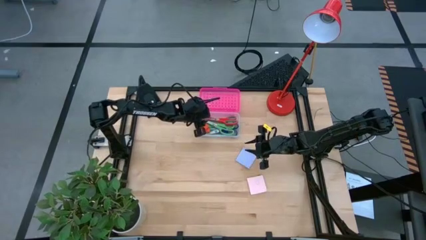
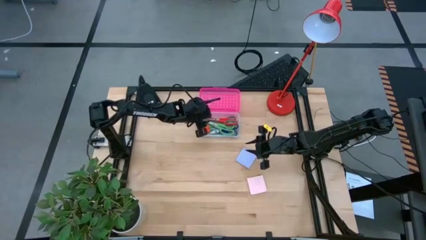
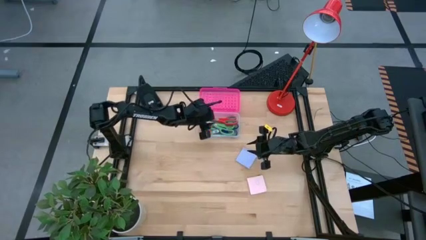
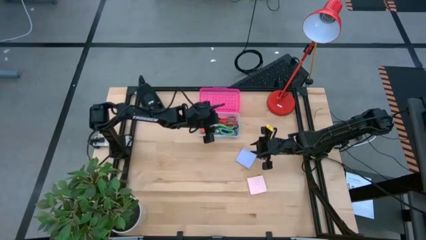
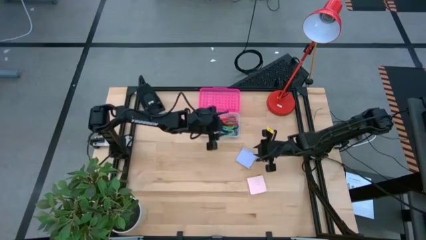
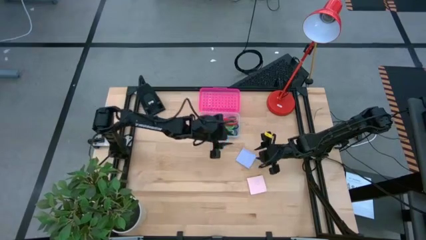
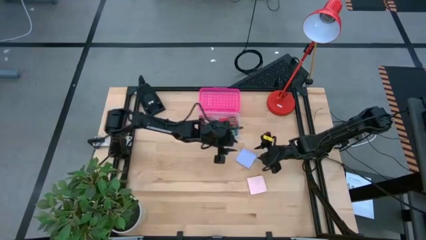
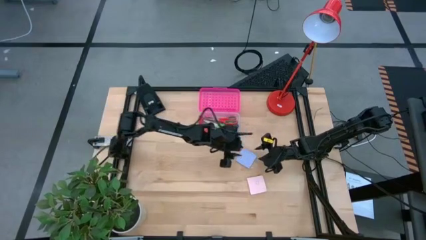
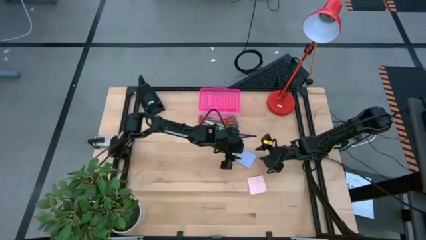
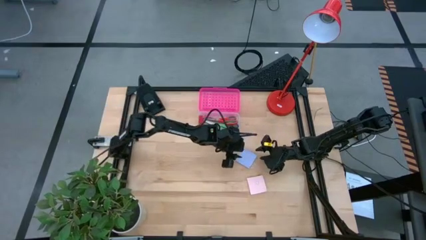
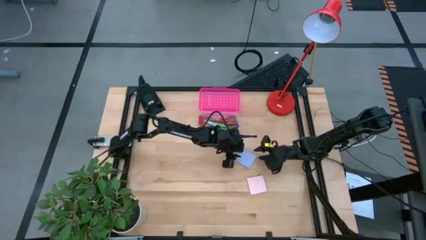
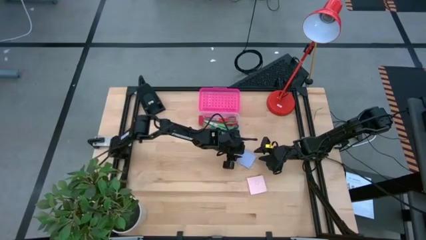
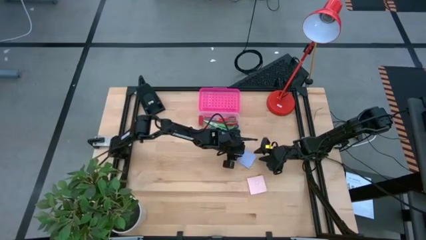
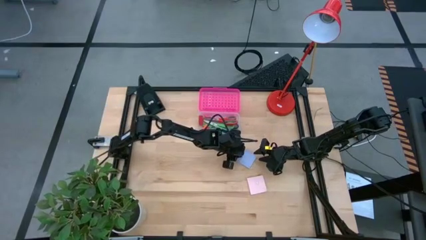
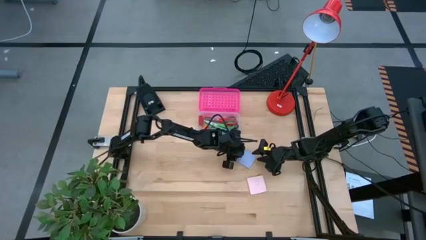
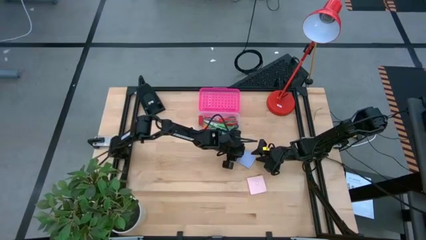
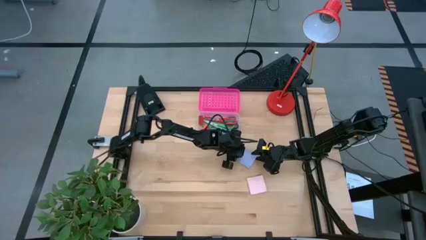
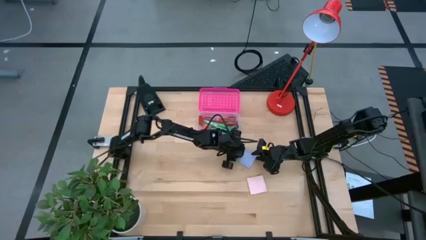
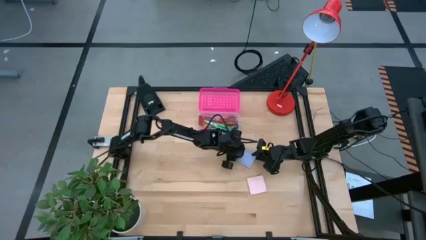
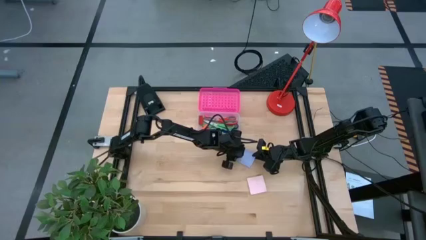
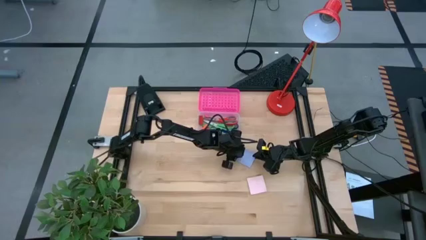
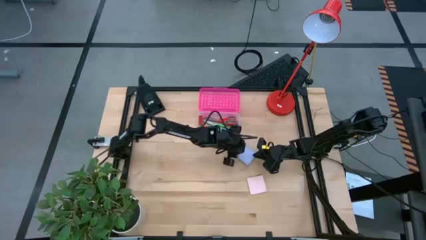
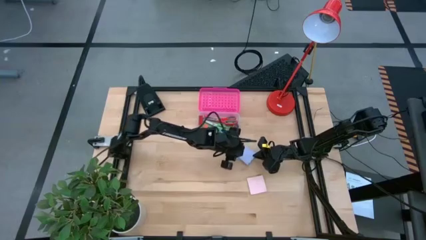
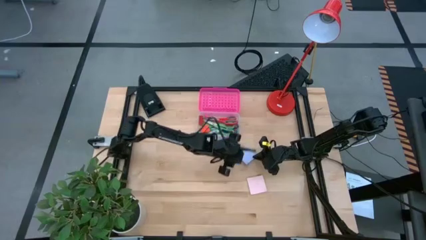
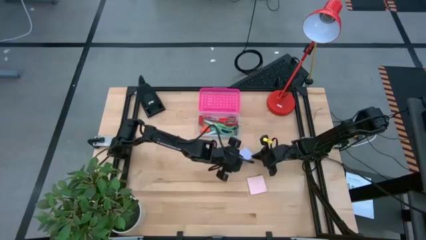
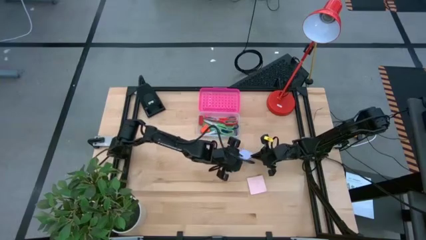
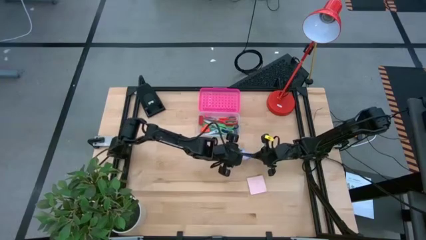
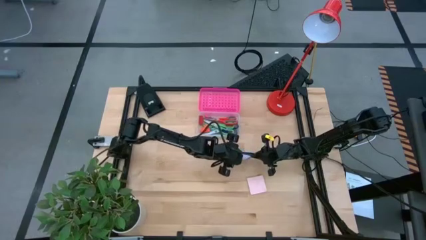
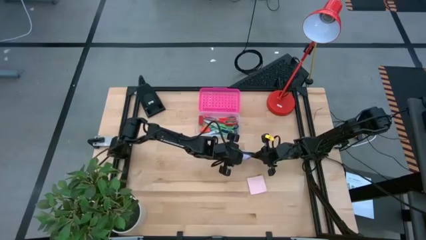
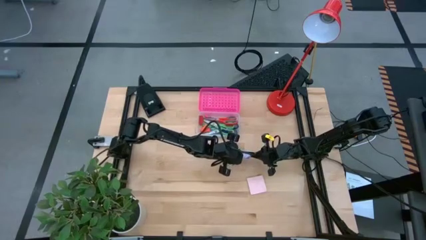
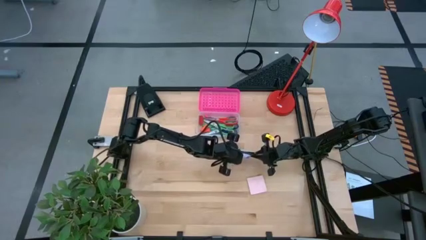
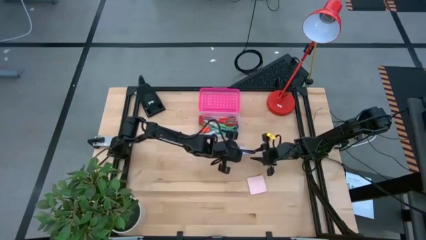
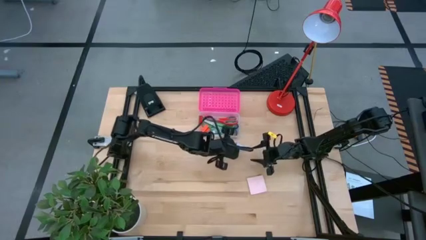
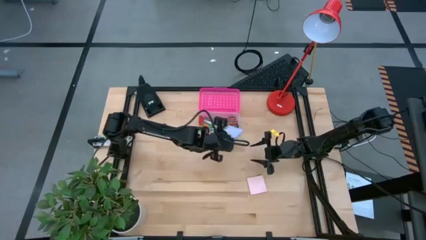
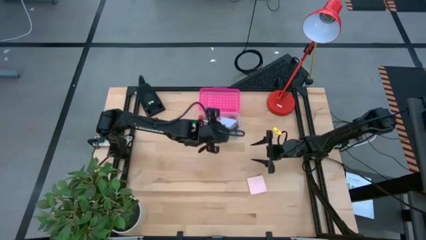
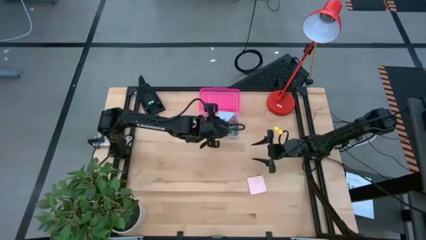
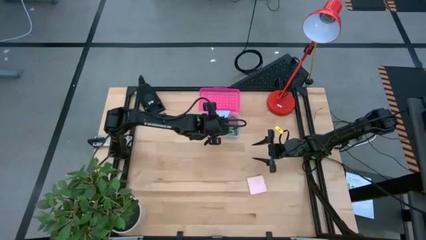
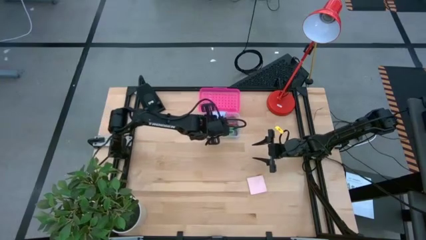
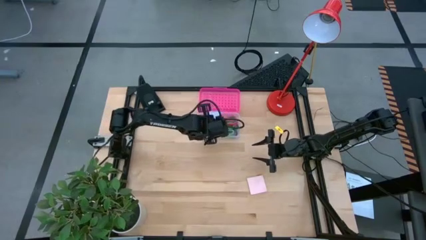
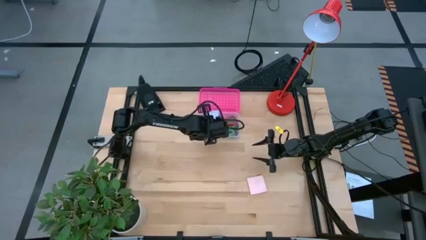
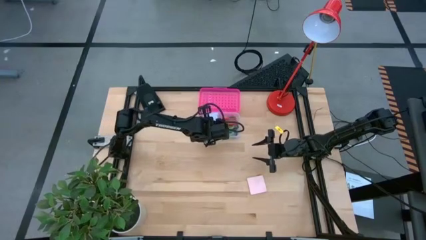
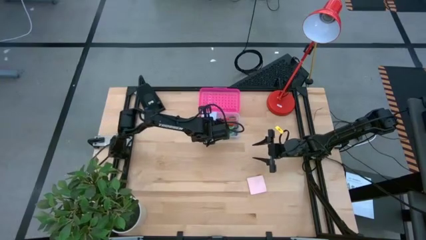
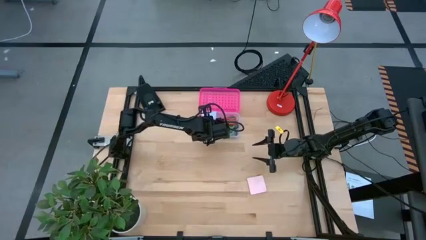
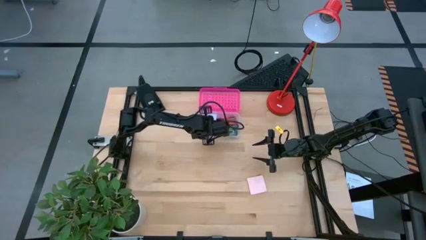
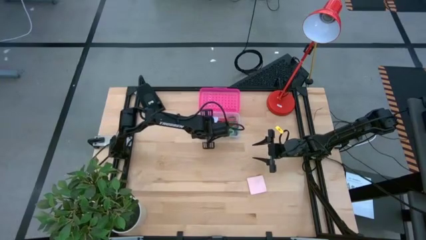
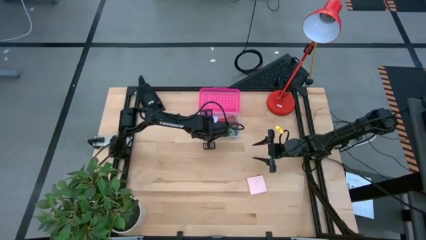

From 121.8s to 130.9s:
Task: Pack school essentials
Put the blue sticky notes into the supply box

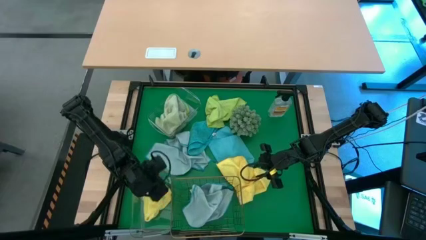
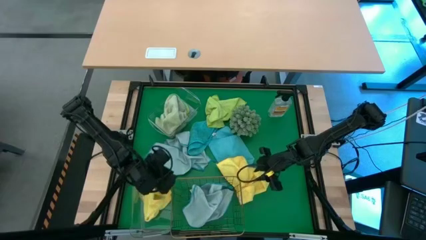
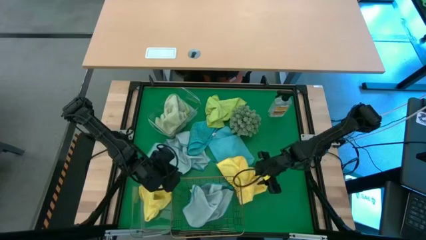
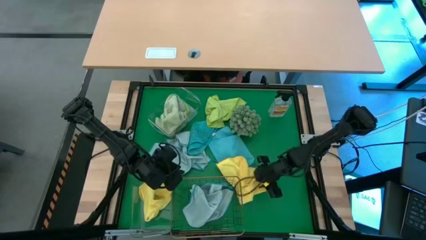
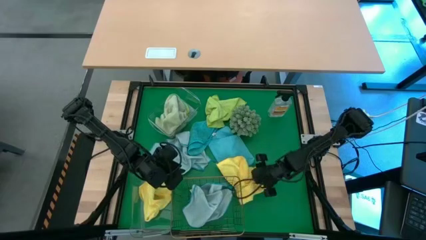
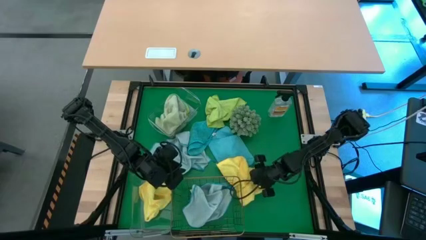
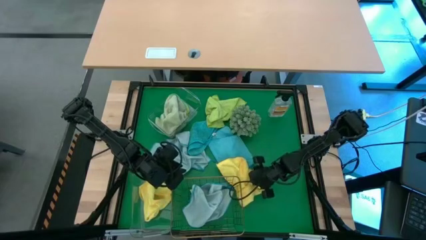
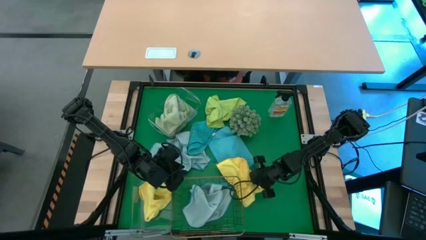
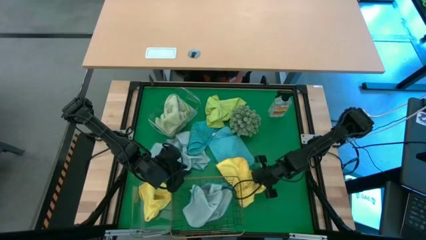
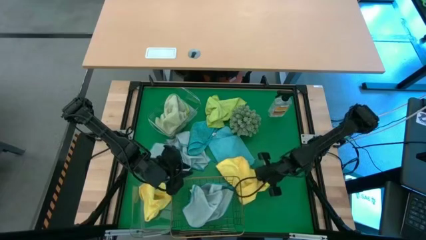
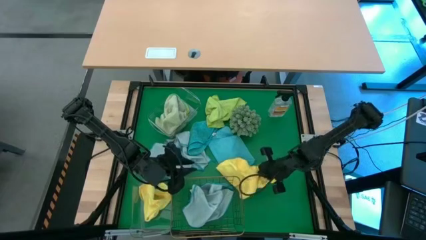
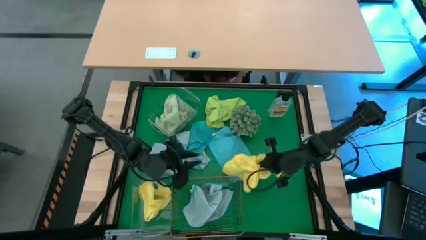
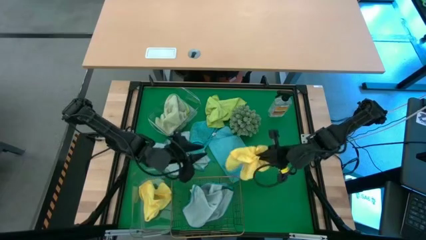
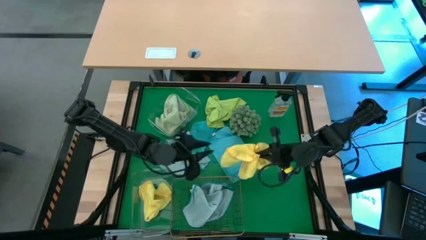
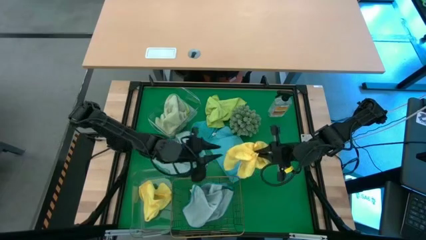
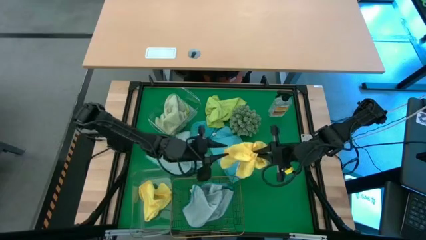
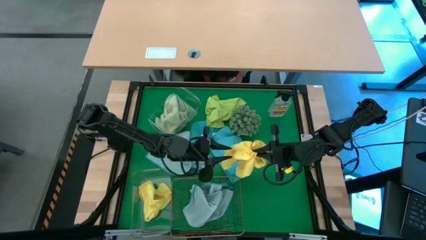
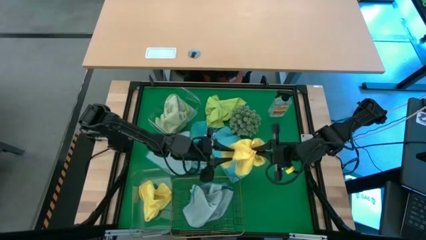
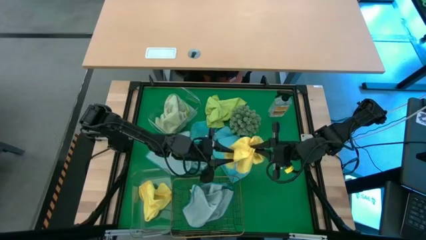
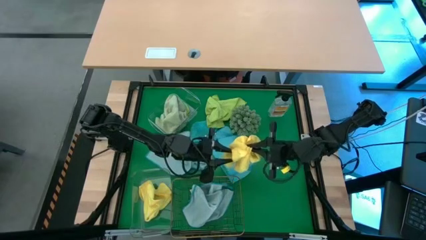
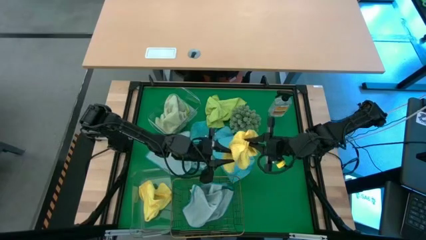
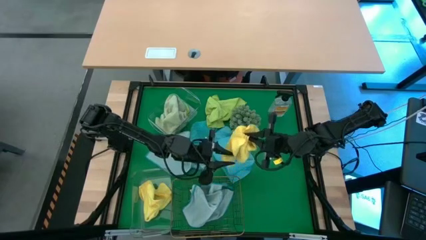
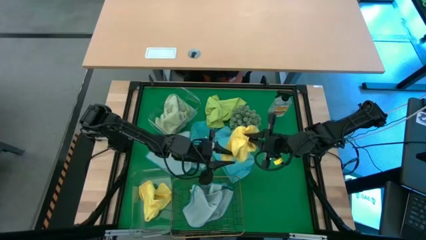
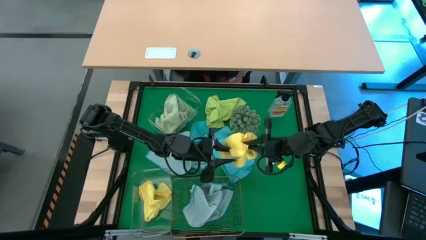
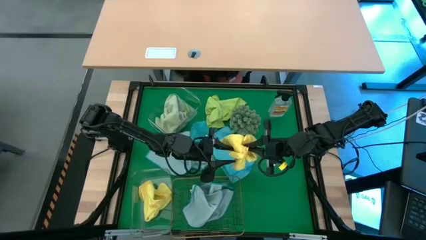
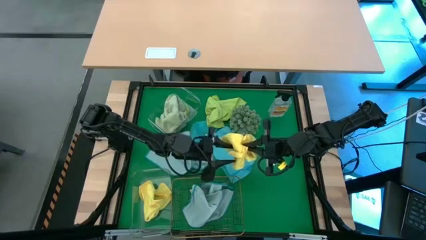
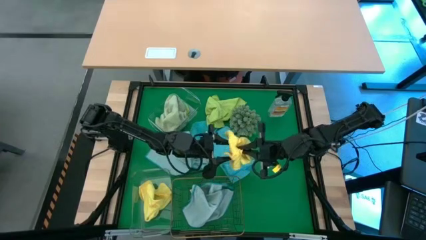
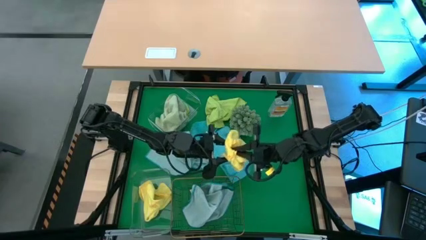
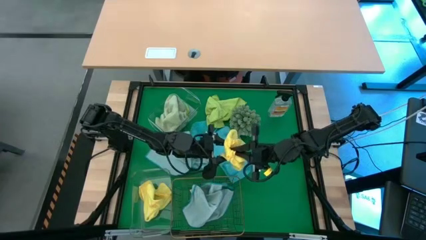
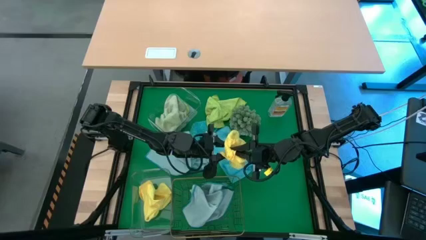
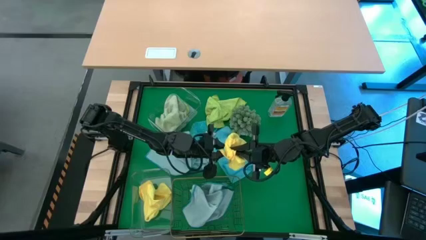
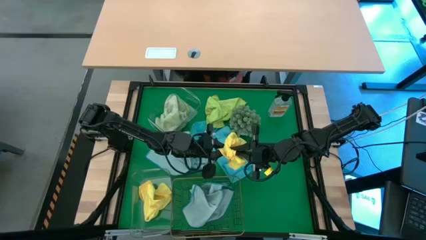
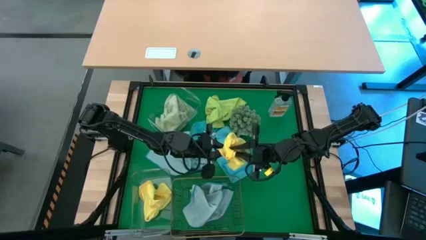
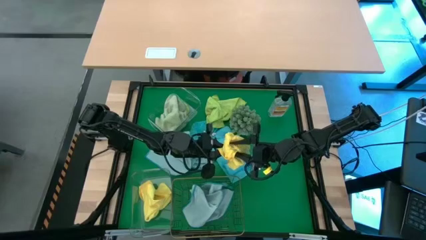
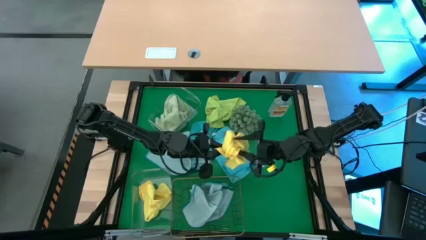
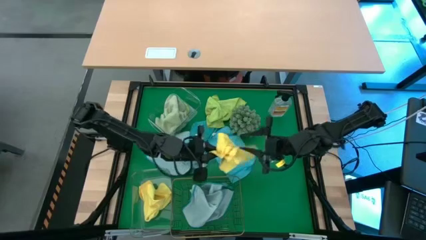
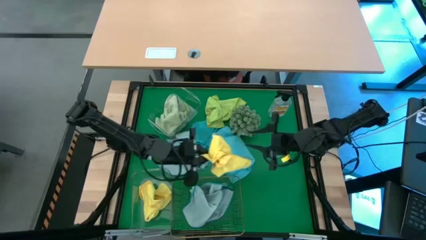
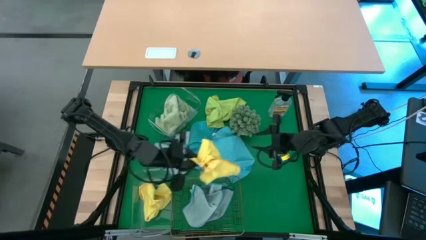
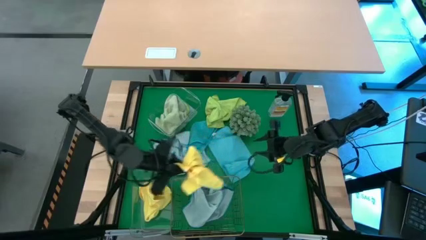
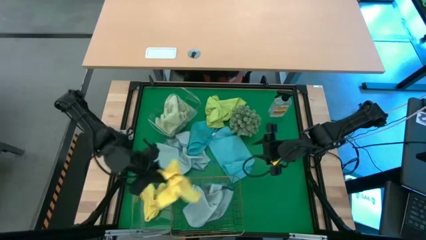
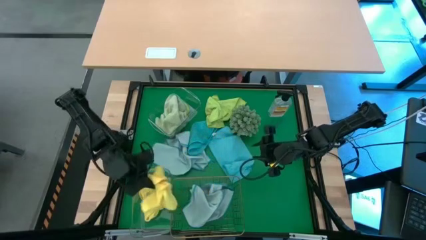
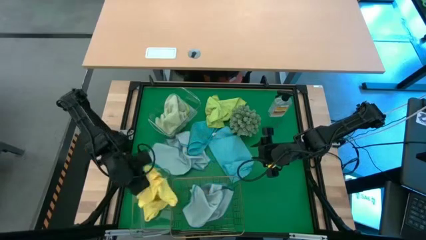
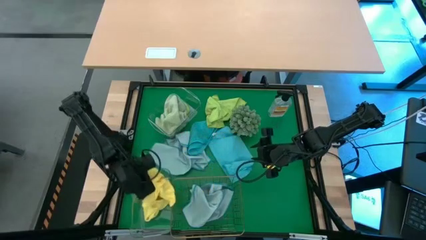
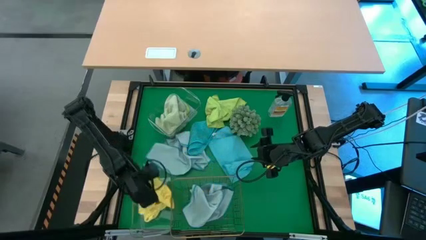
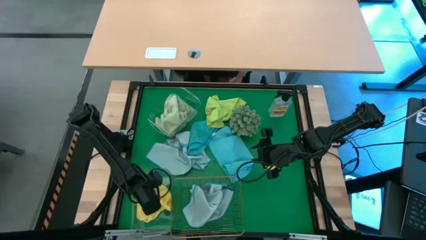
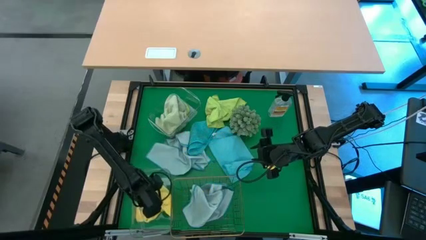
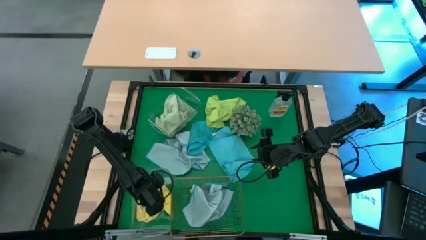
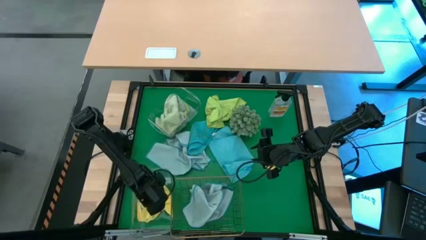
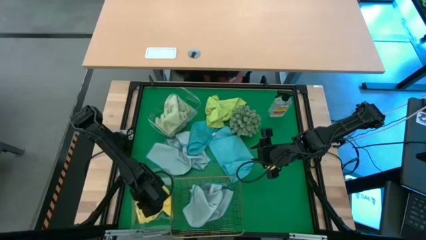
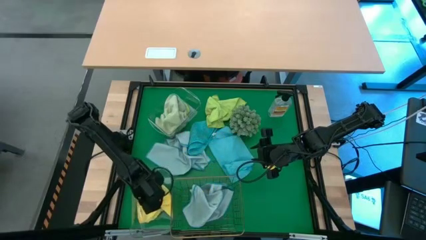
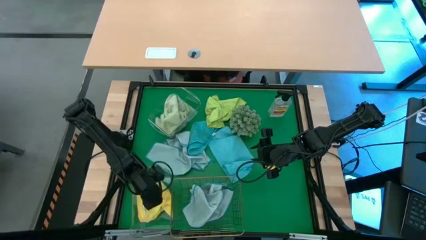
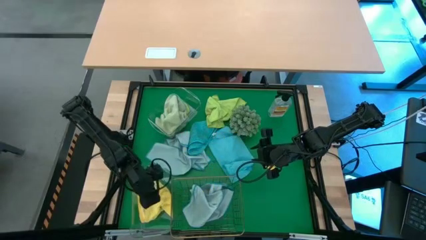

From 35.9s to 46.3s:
Task: Sort microfiber towel by color & place in baskets
Put the yellow microfiber towel into the bottom transparent bin
